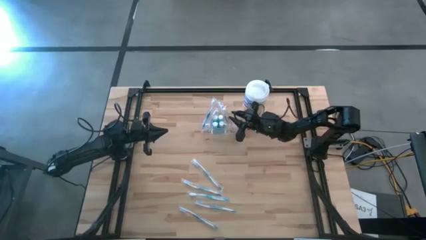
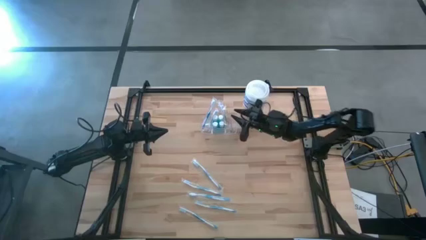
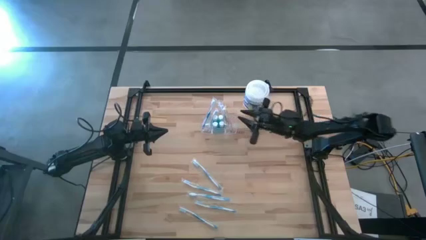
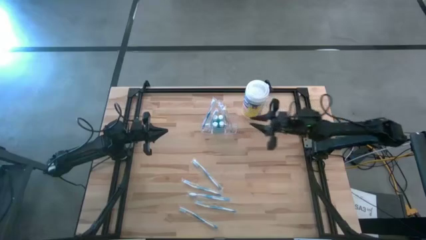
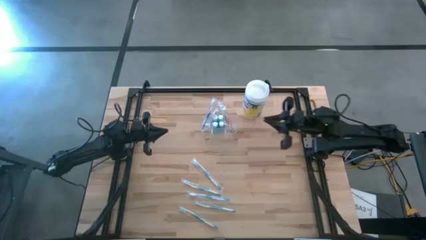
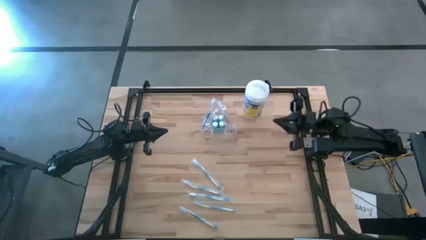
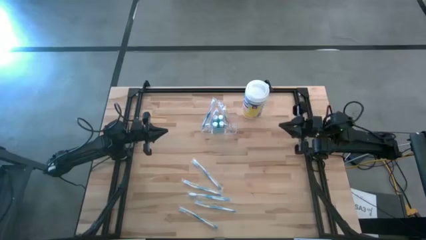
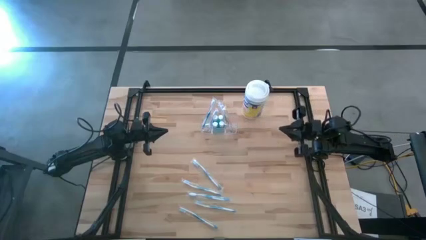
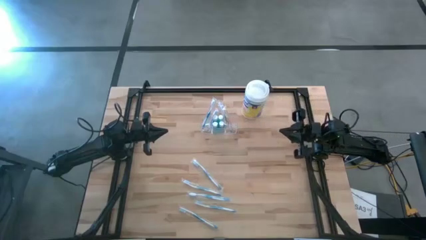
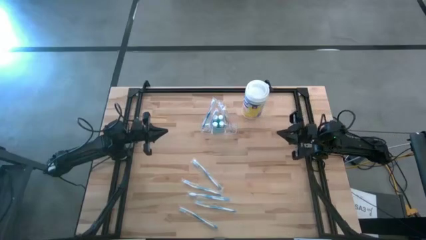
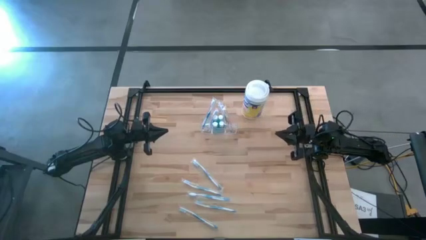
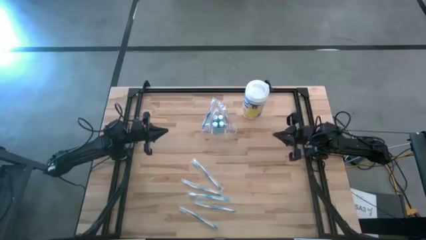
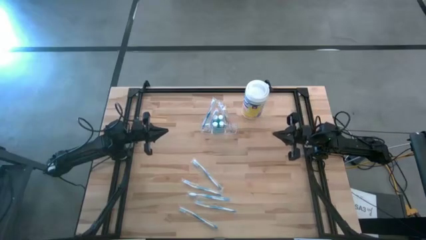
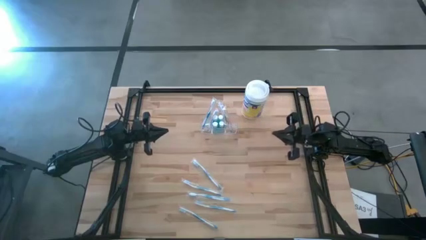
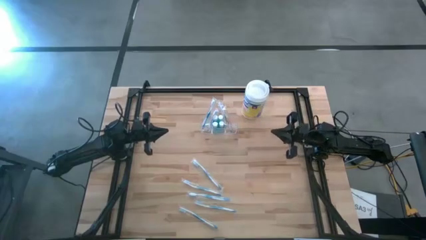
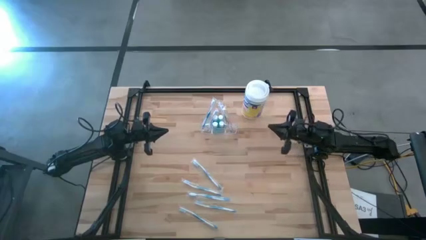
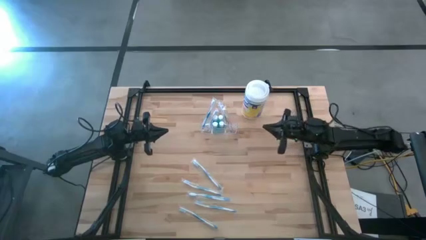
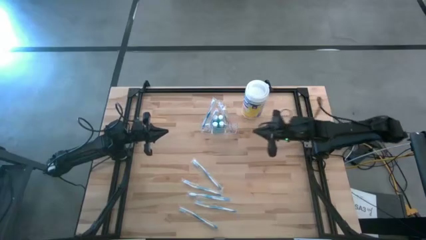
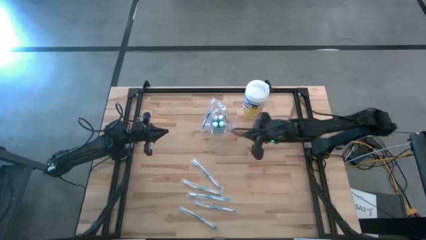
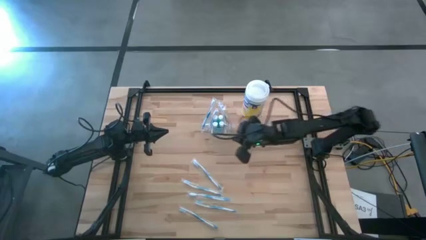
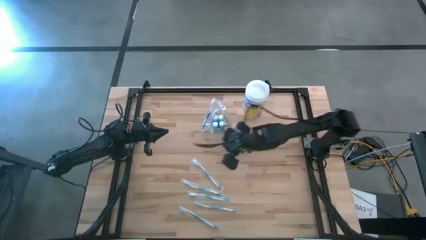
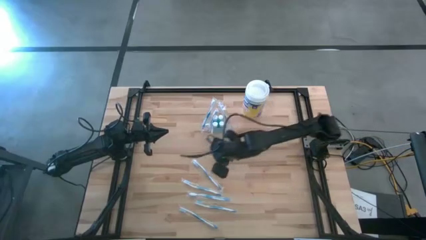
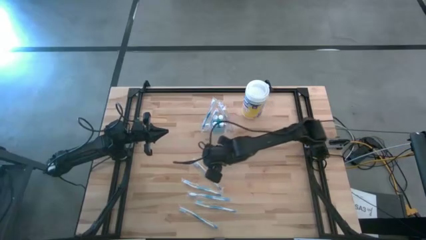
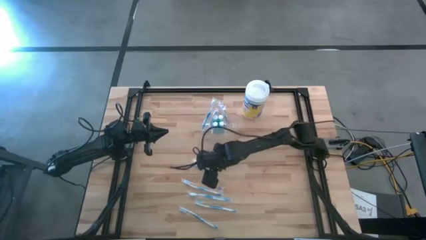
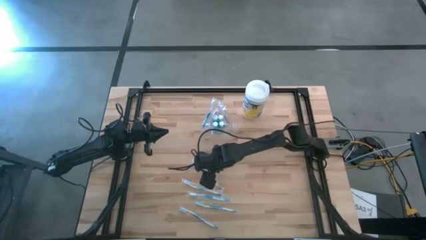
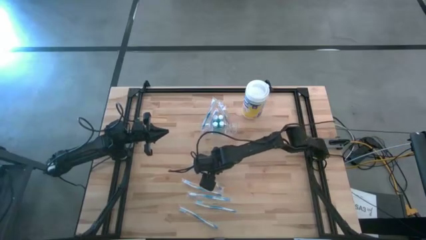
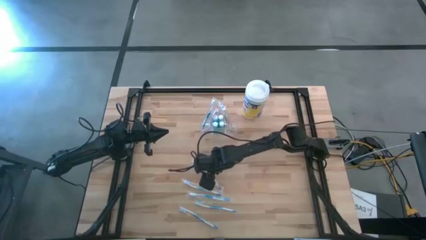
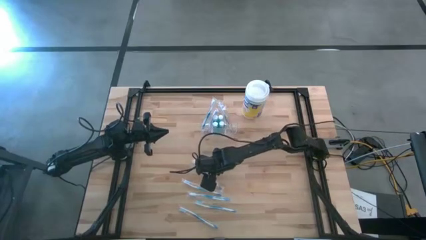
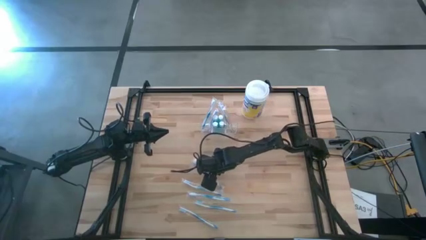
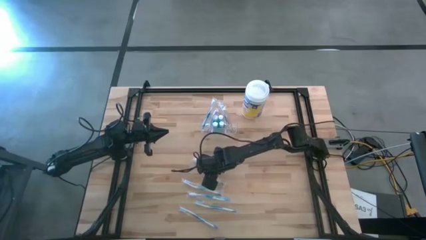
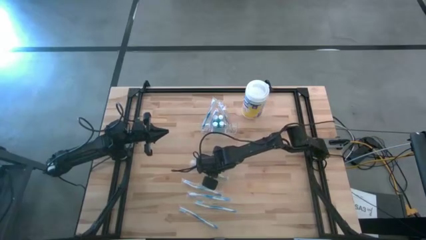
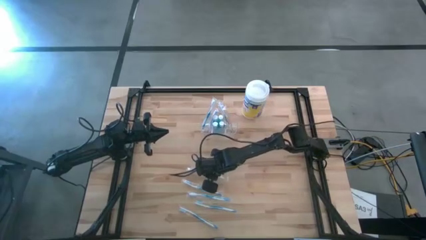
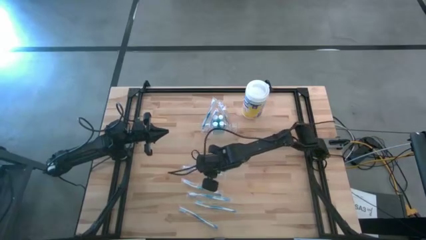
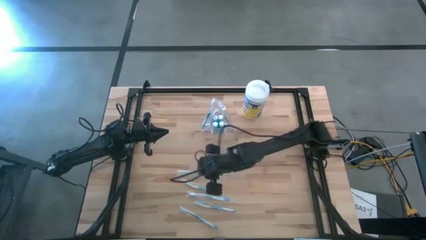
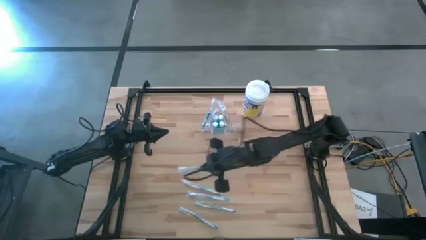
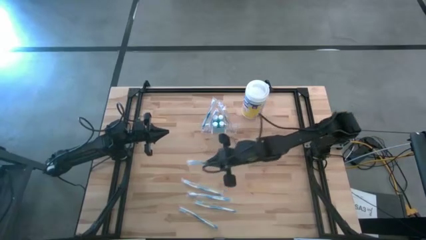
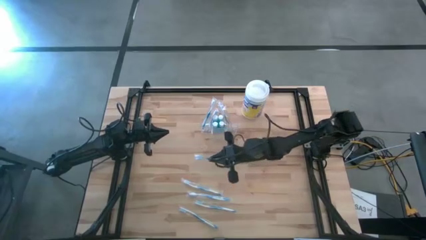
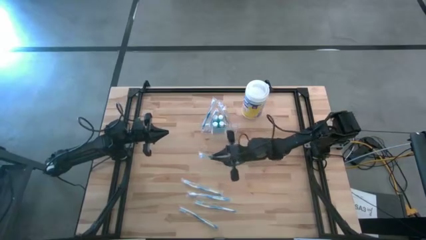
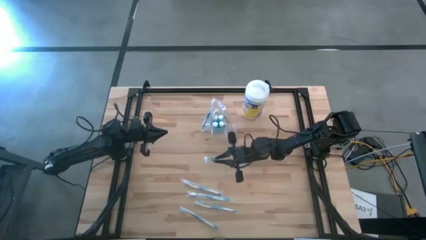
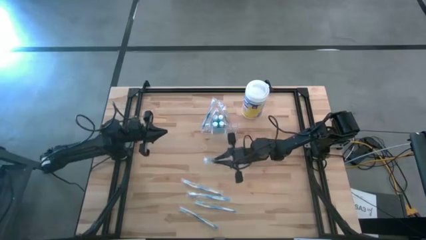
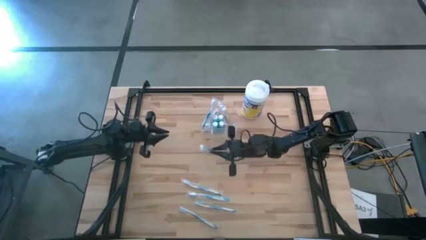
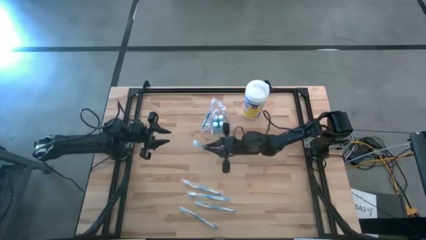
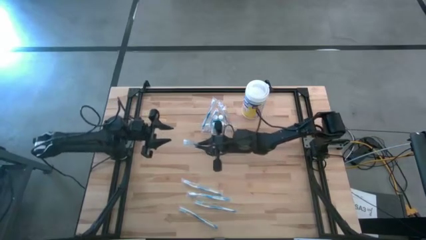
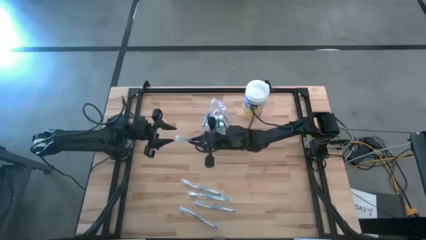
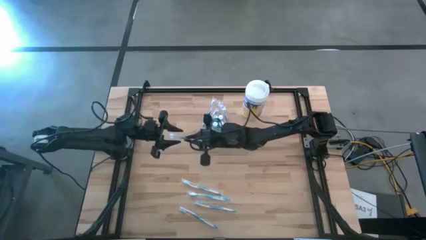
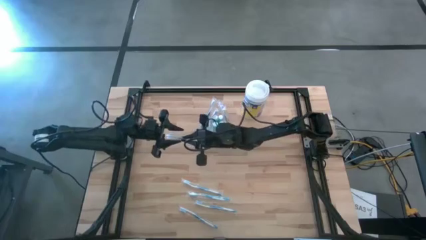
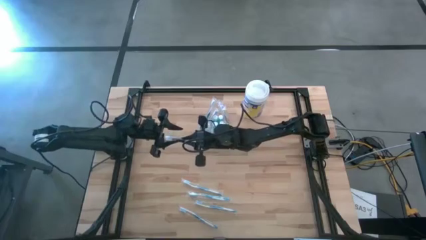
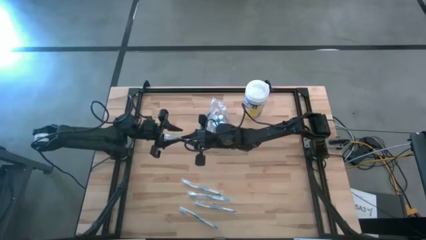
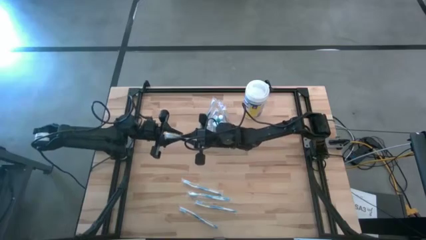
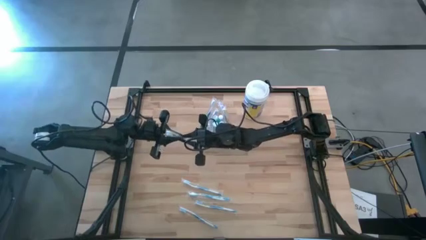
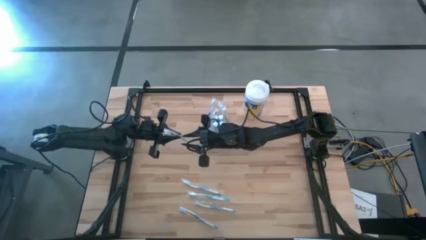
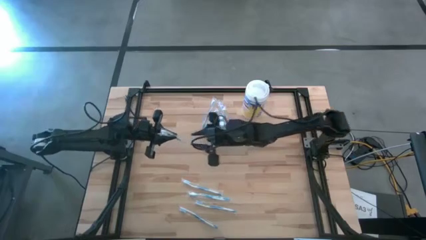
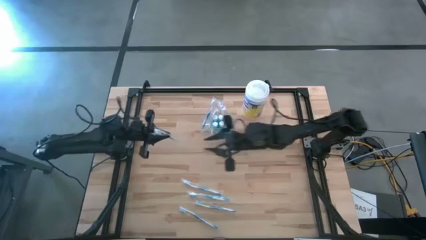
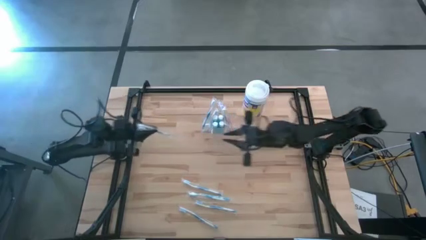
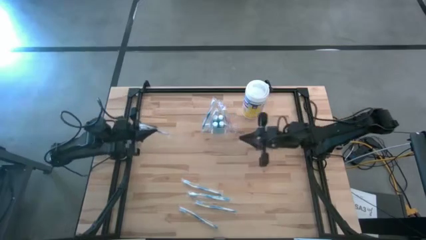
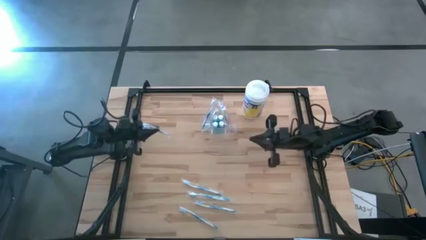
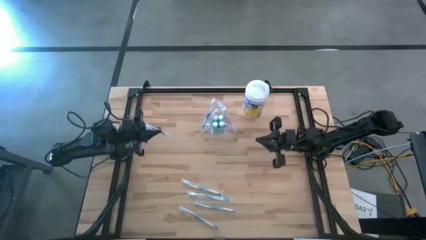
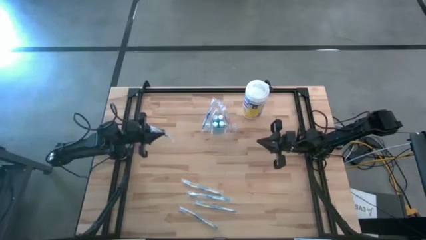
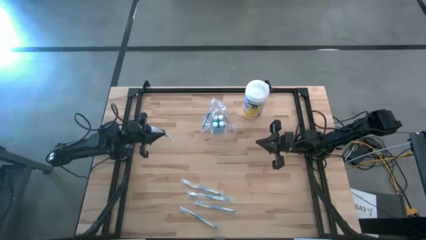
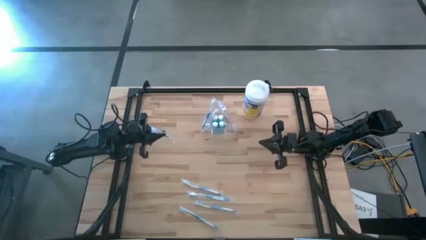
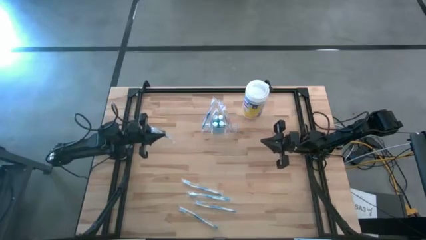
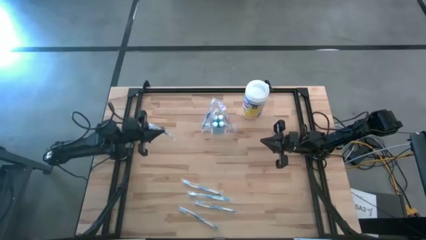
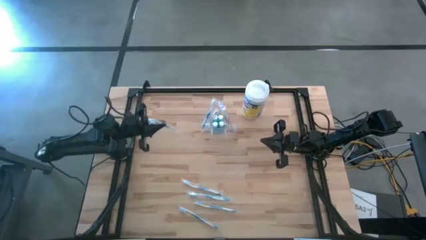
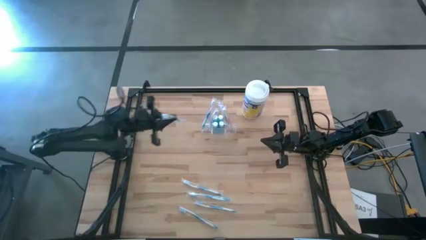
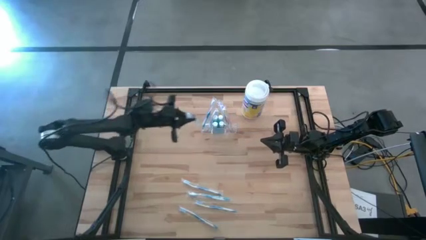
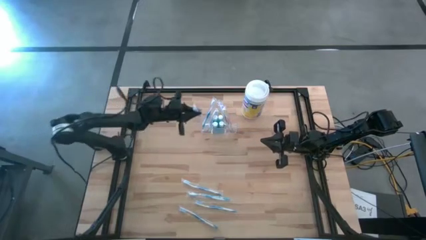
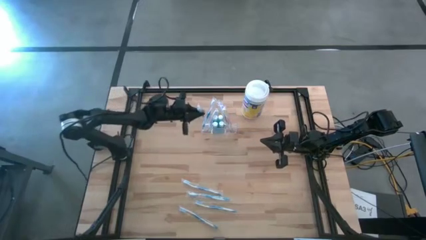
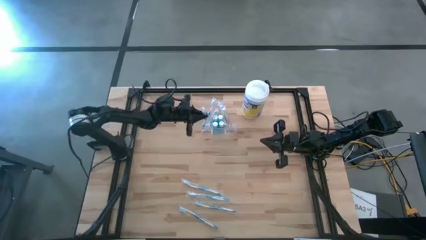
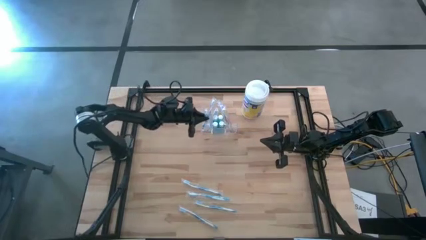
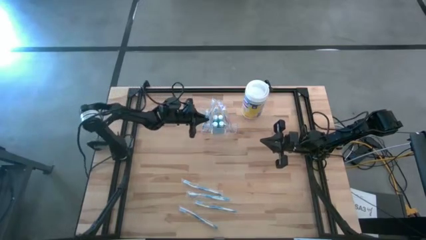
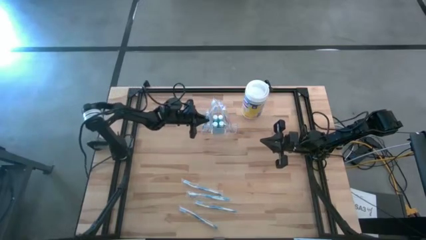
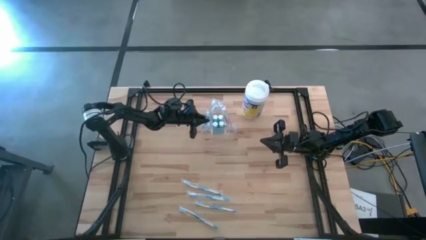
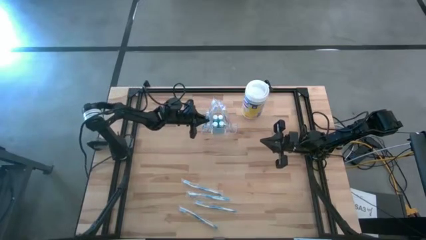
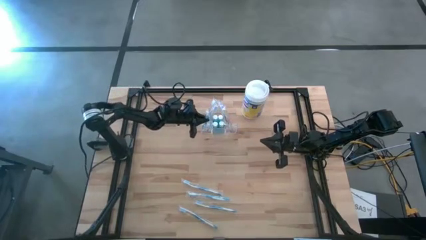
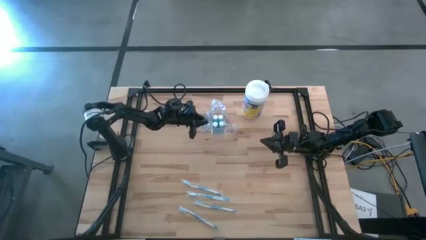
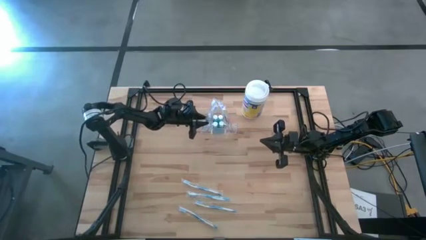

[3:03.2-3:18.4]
Task: Pick & Place toothbrushing station
Put the blue toothbrush into the transparent organizer
